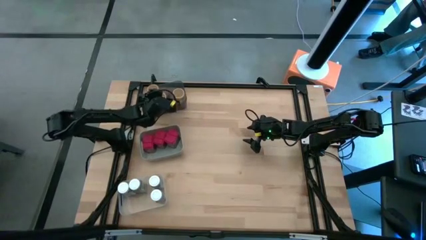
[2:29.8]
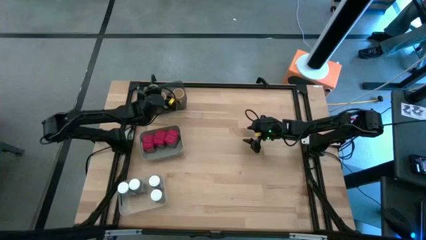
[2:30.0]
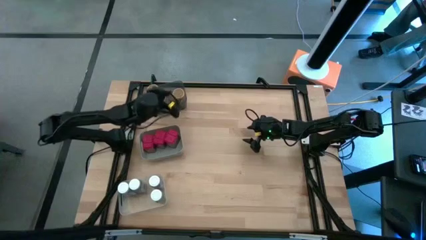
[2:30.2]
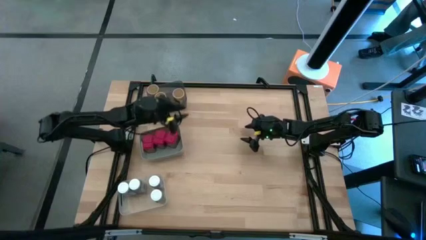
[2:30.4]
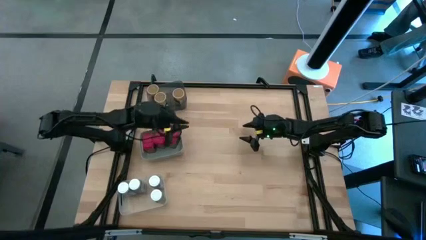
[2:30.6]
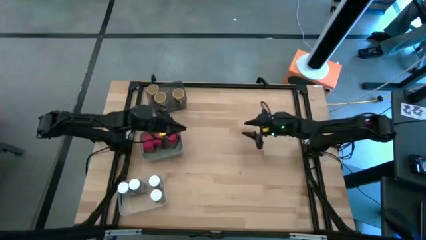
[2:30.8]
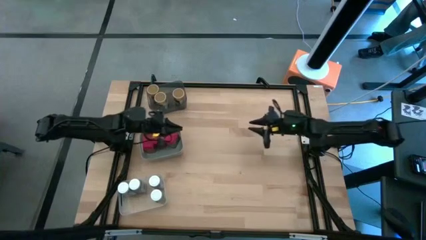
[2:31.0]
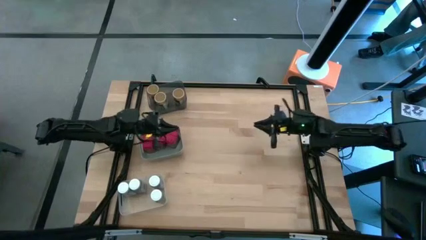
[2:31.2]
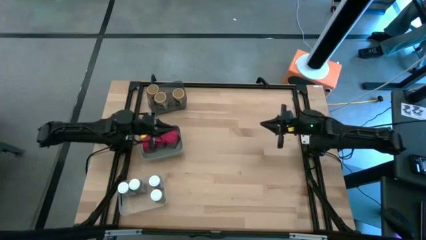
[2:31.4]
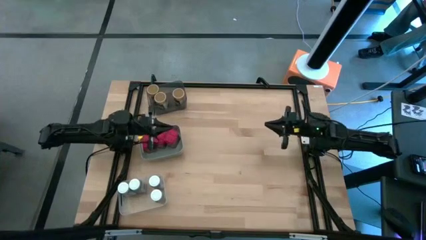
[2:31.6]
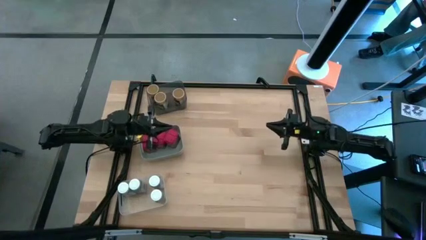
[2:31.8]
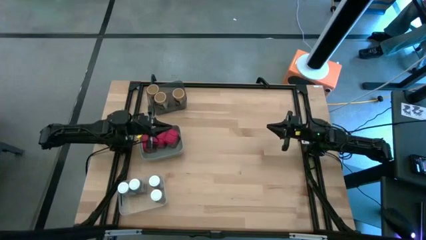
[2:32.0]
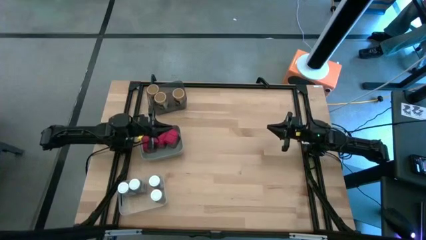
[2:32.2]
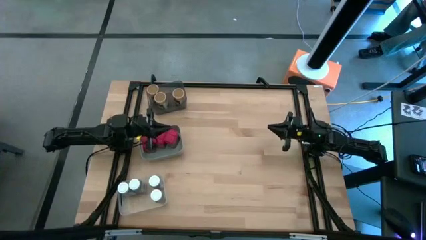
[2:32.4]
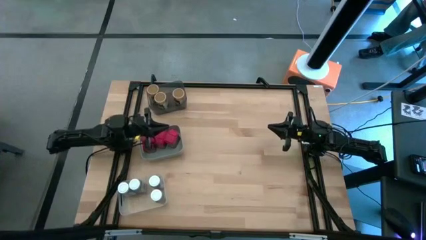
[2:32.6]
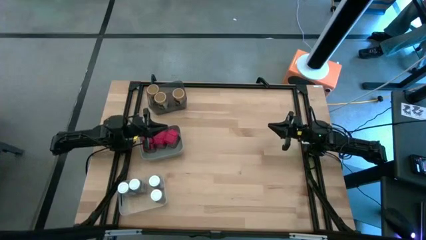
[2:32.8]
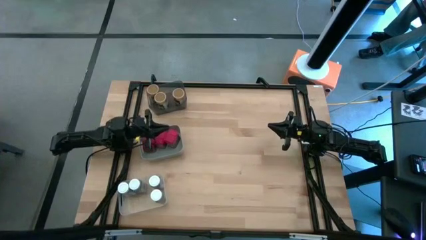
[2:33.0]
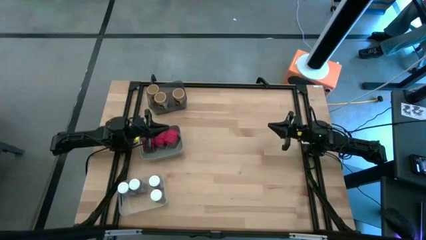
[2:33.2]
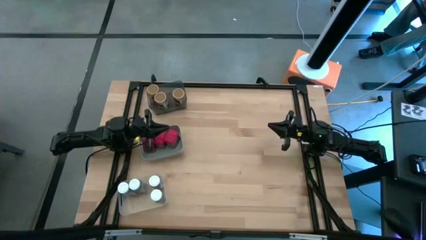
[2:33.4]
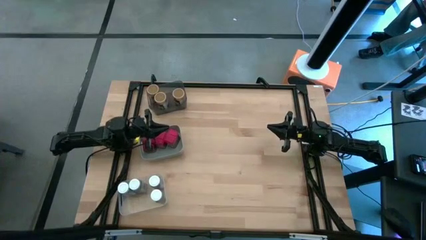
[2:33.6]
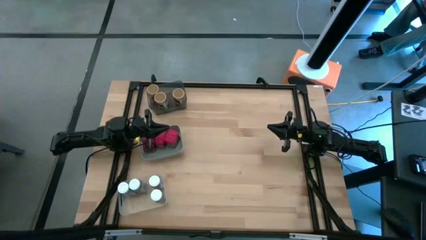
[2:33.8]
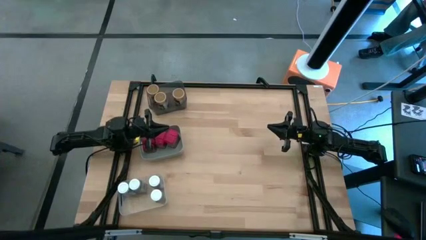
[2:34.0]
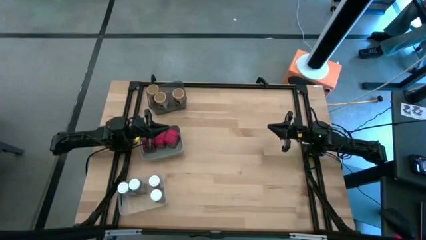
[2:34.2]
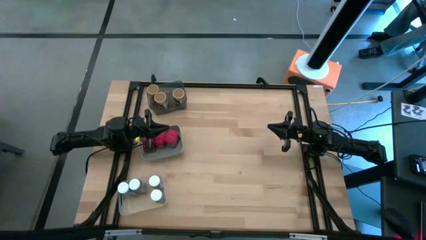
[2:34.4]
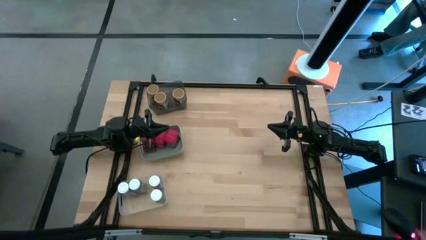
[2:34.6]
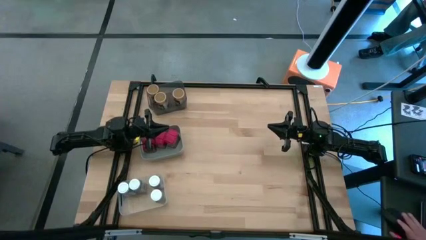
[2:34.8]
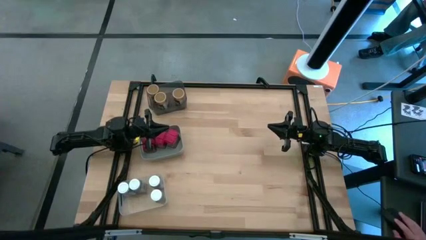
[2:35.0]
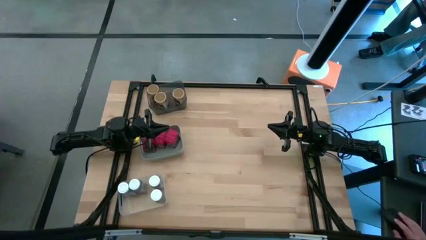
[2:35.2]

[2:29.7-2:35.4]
Task: Sort spices by type
Return to Home Position

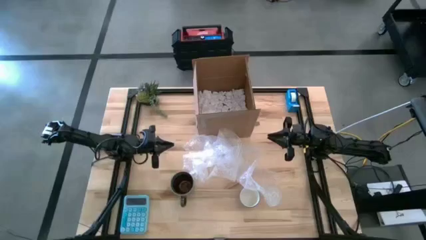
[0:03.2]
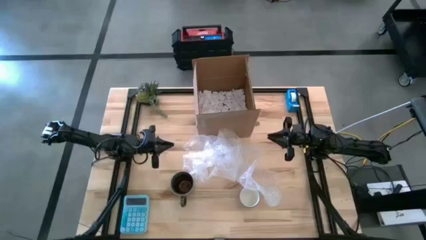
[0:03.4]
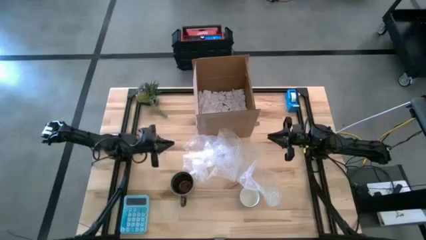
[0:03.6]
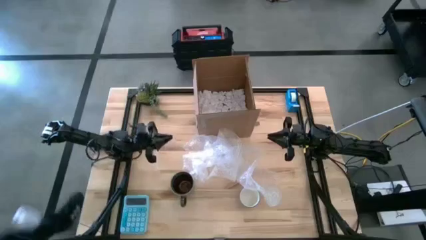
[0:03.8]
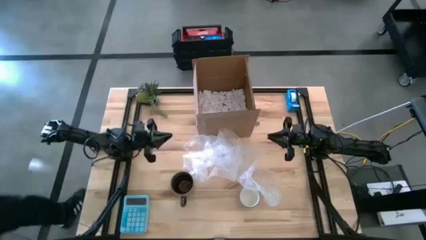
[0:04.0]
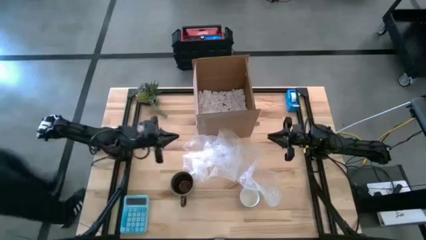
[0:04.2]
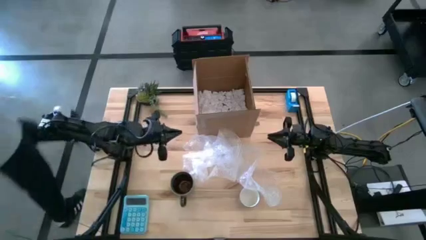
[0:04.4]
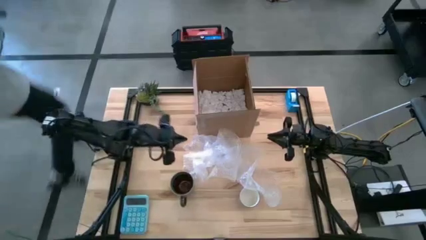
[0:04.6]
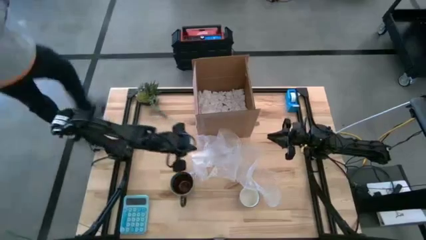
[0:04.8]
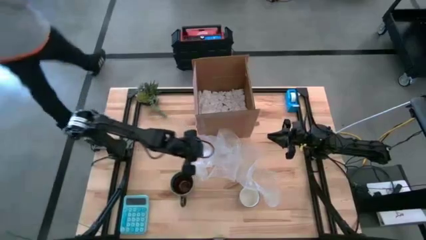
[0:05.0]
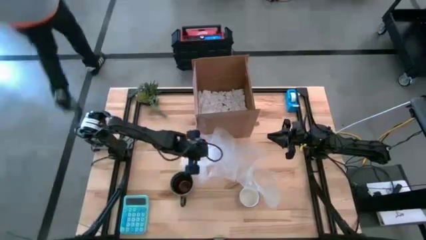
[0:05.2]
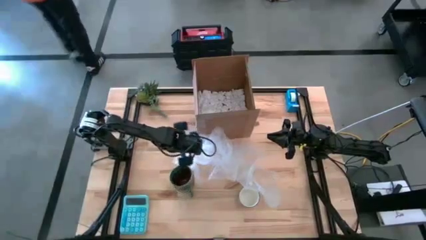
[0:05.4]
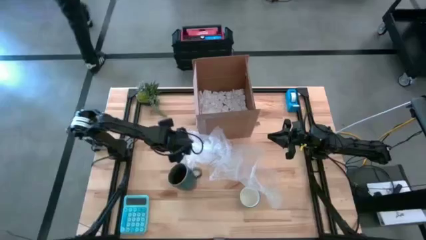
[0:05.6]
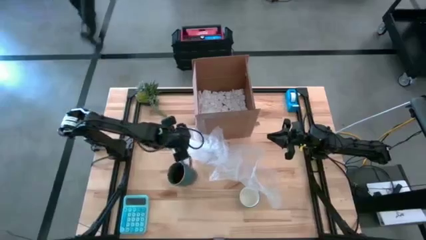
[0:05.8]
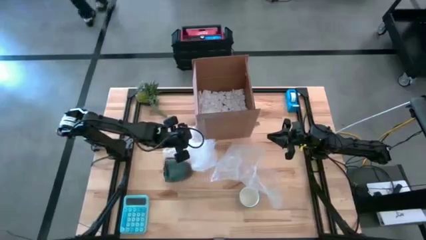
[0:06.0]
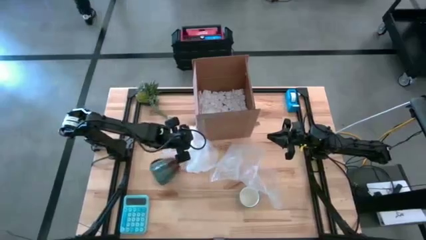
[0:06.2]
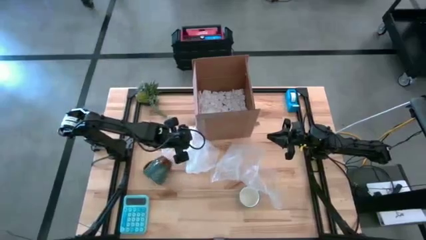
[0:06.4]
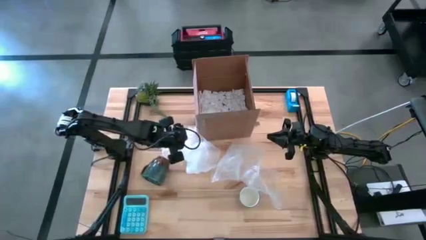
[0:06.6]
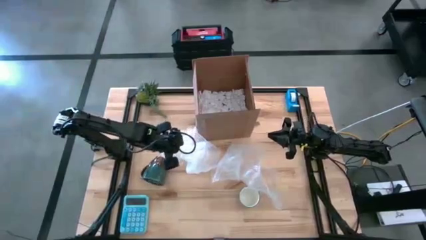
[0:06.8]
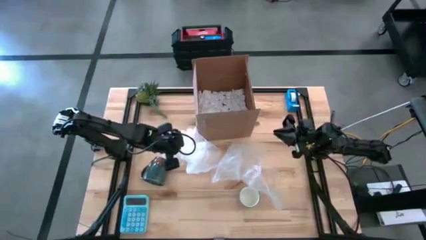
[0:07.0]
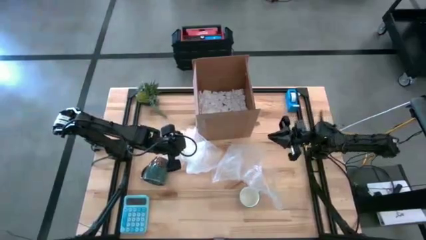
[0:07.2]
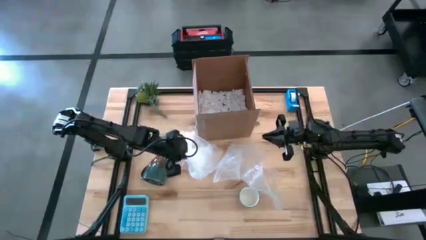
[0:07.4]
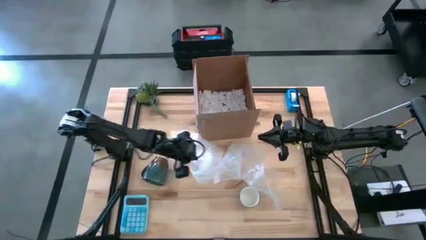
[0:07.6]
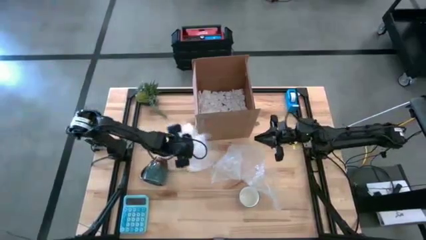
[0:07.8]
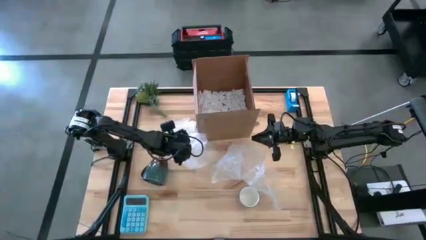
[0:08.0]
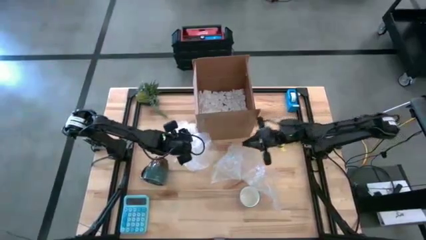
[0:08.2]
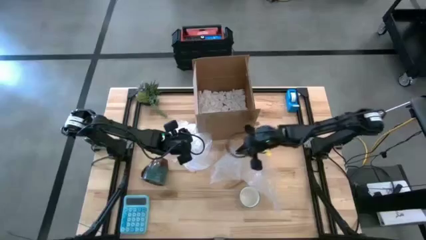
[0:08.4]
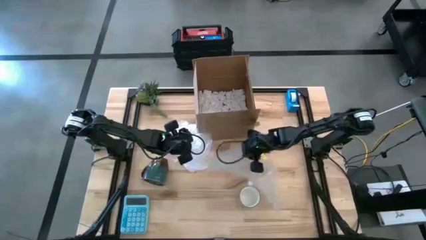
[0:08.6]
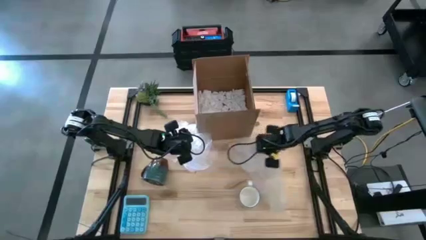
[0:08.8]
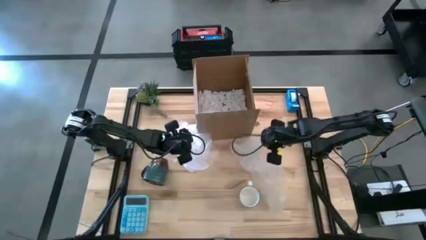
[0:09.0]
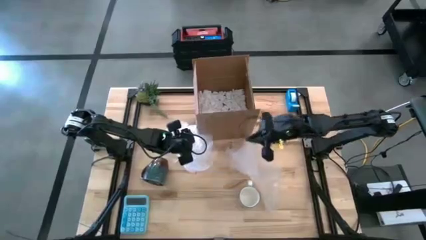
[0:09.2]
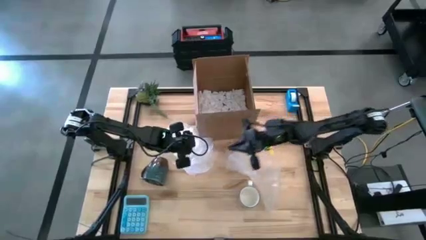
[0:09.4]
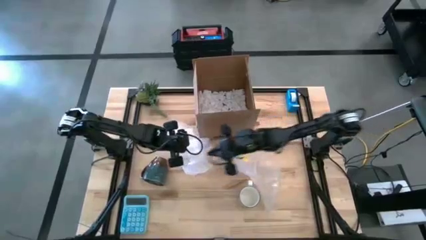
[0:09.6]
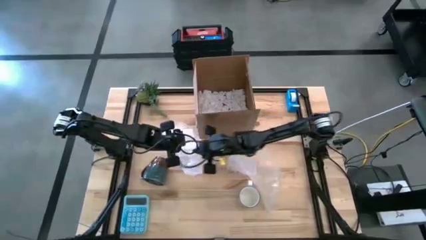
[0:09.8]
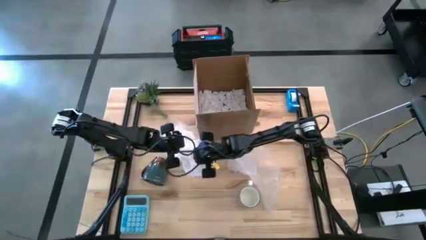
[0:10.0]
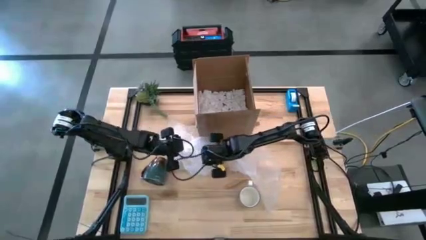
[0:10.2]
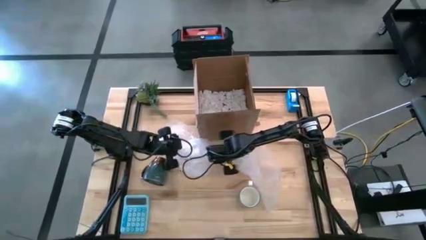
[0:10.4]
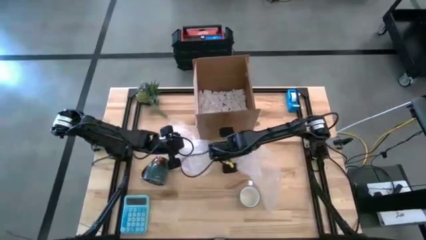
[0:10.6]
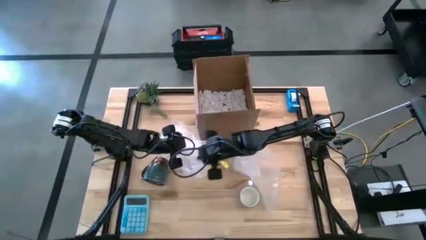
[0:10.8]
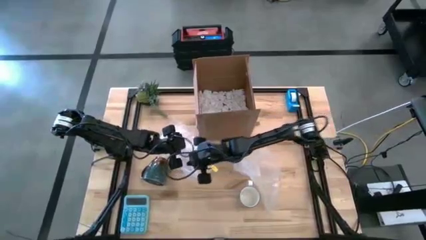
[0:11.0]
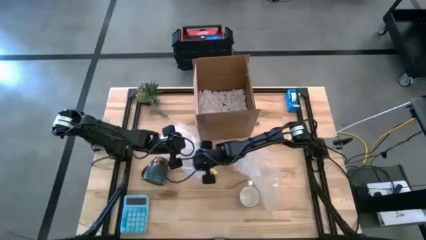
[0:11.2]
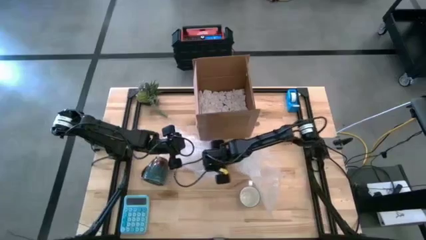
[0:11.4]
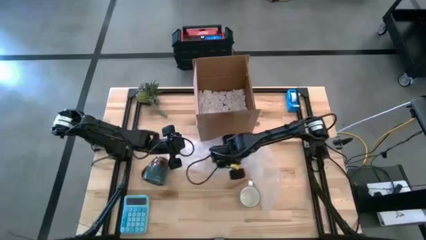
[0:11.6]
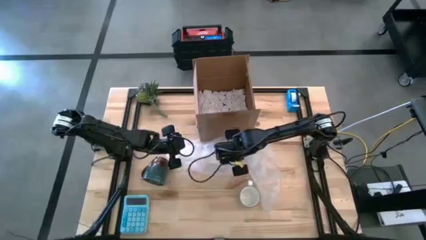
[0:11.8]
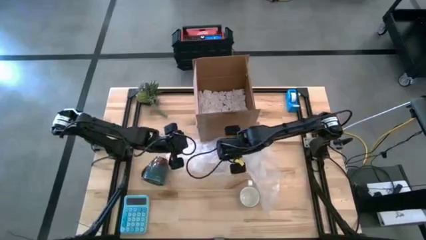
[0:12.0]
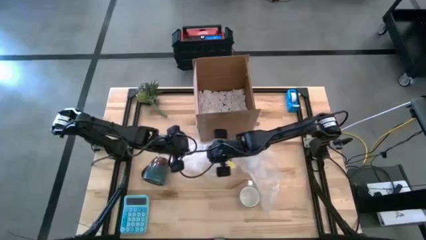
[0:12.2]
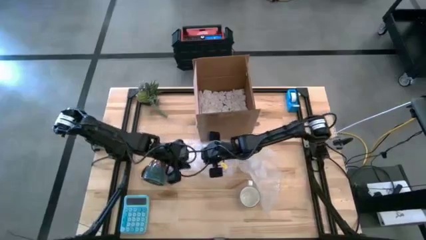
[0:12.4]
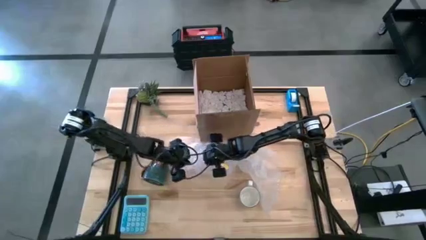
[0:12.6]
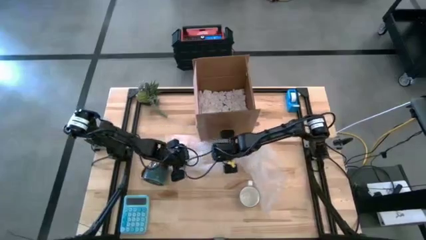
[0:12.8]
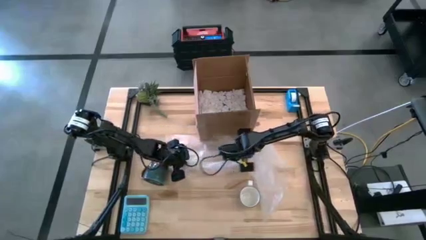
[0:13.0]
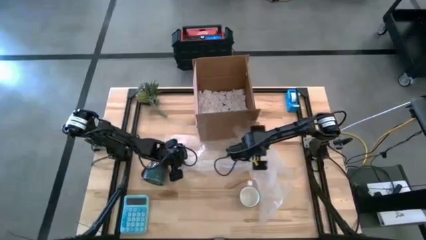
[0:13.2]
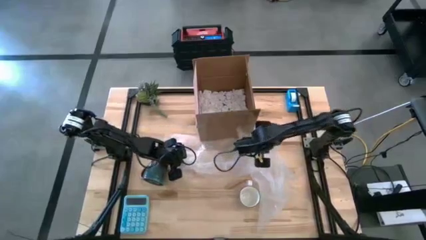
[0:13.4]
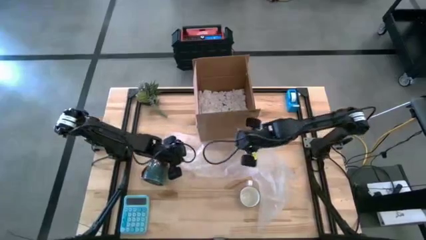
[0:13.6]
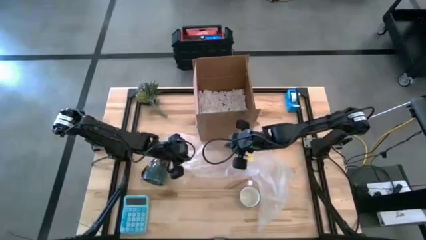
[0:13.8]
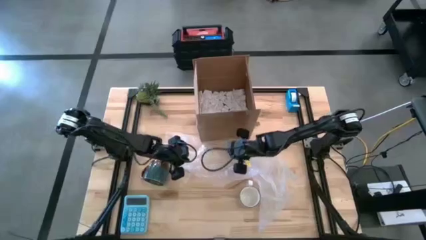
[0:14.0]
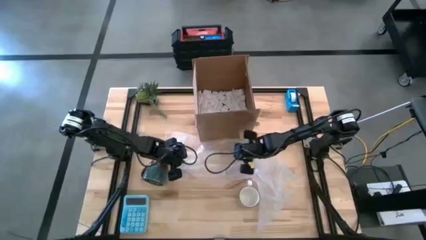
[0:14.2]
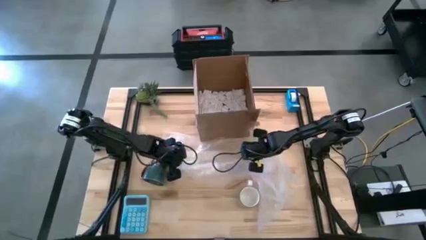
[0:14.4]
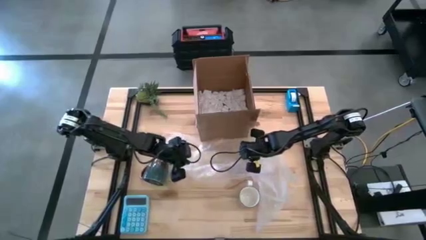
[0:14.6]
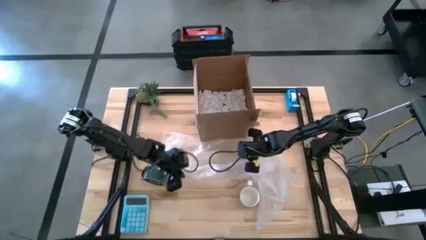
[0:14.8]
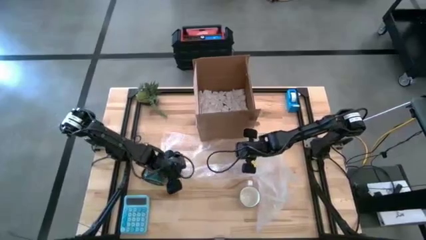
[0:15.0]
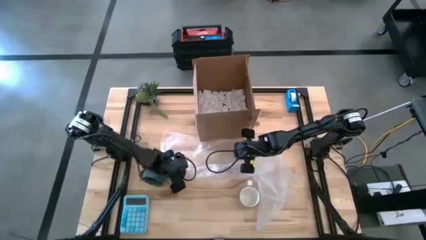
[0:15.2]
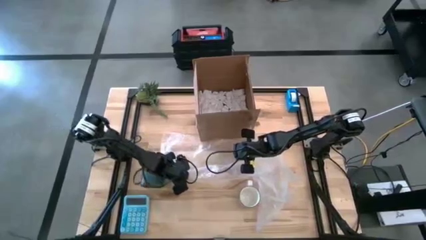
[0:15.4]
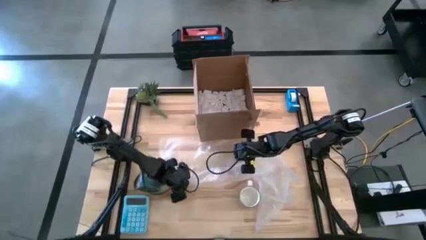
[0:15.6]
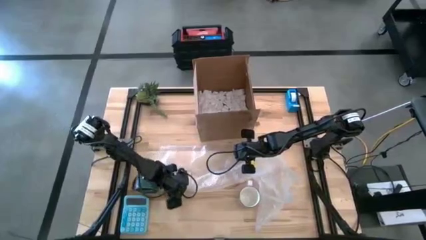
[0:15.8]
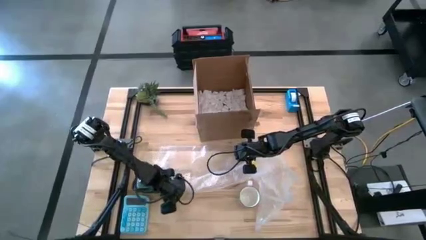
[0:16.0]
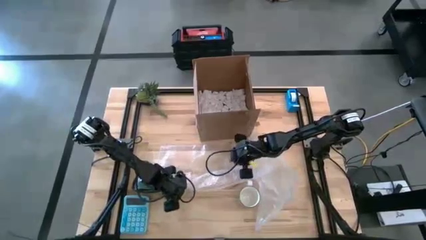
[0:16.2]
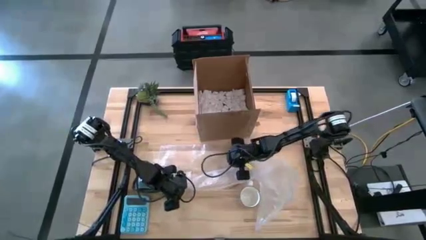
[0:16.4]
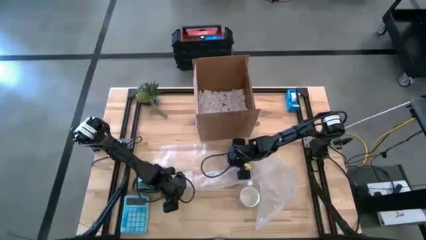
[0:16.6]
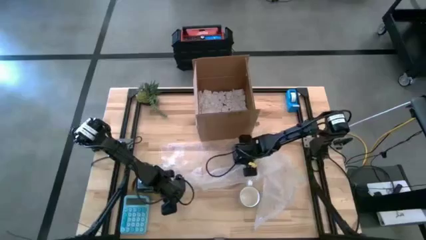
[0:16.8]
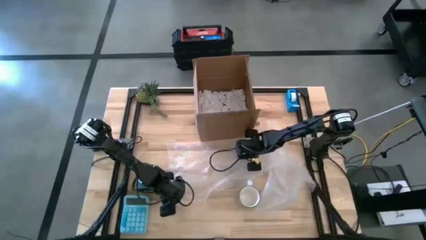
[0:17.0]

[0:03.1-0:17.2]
Task: wrap mug
Prepare the left bubble wrap
